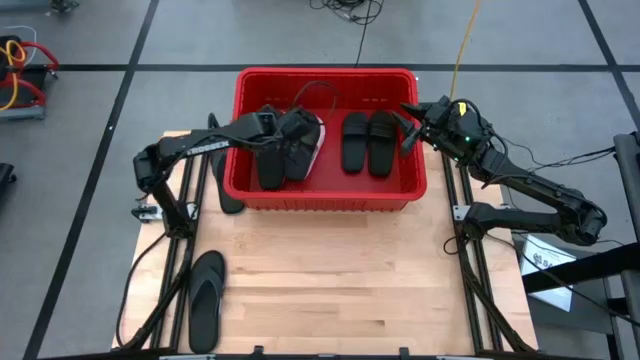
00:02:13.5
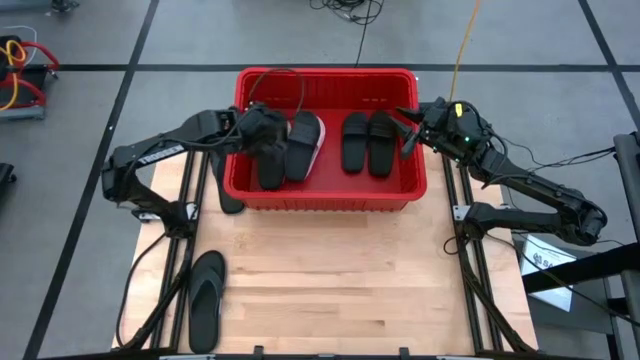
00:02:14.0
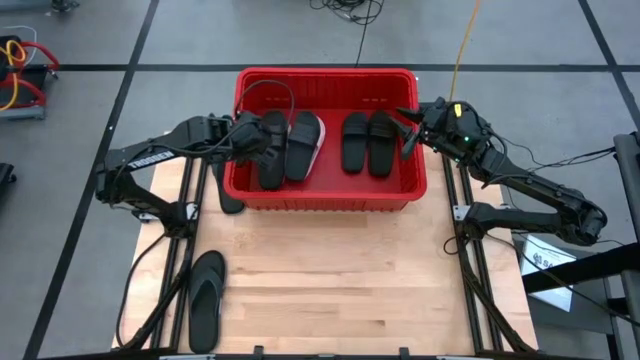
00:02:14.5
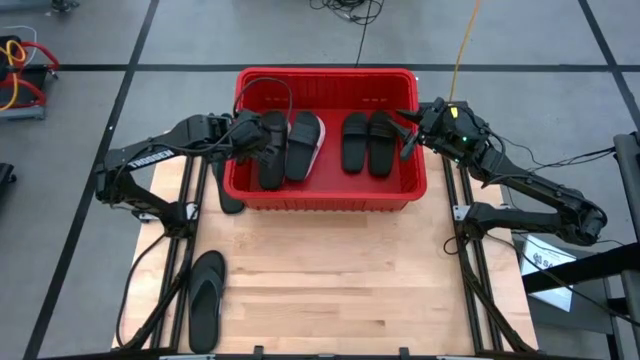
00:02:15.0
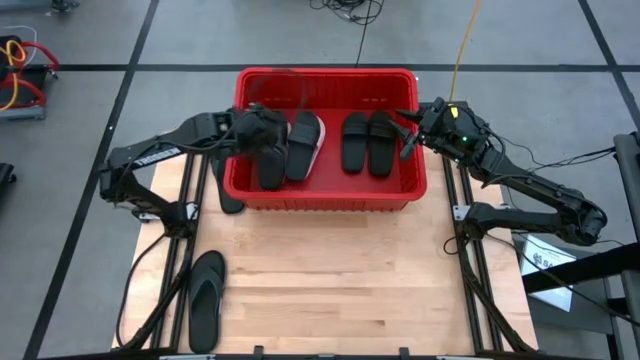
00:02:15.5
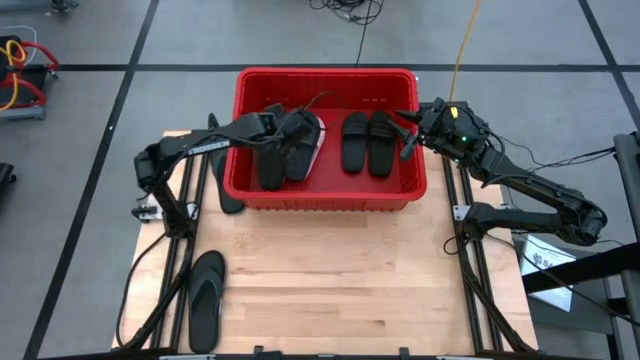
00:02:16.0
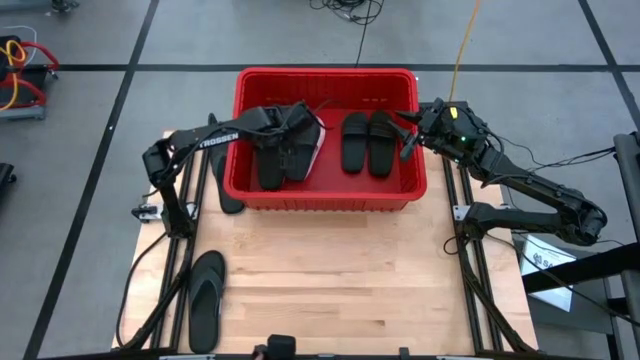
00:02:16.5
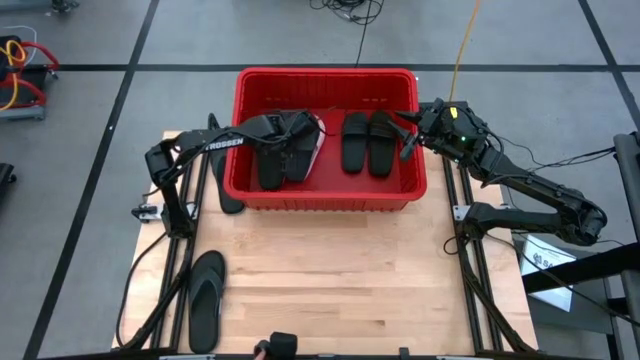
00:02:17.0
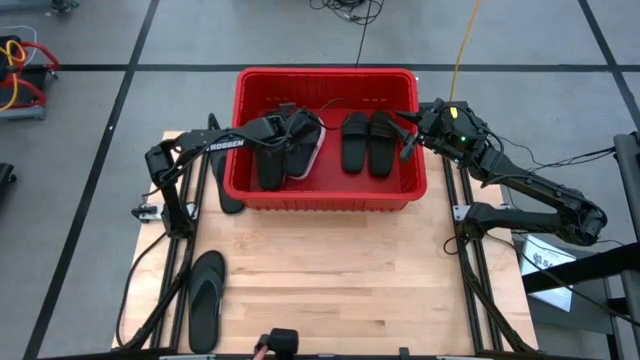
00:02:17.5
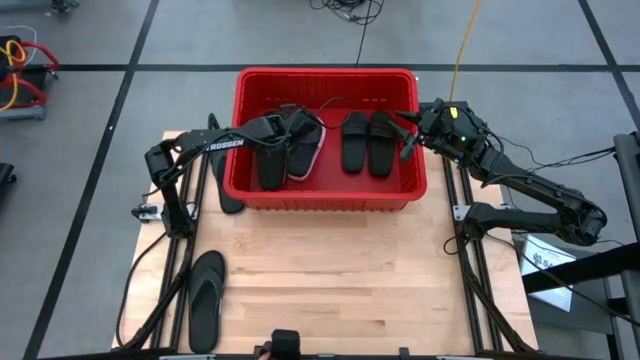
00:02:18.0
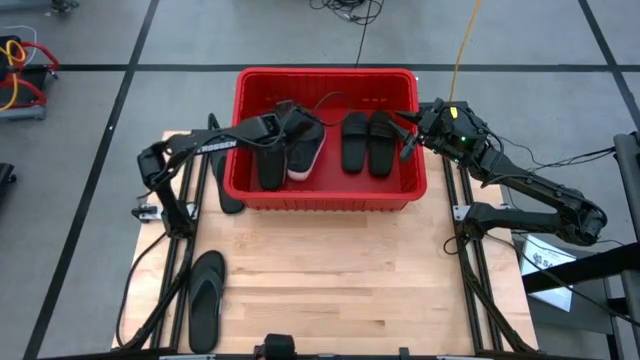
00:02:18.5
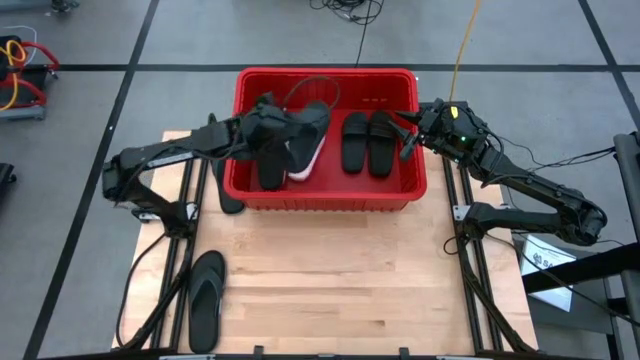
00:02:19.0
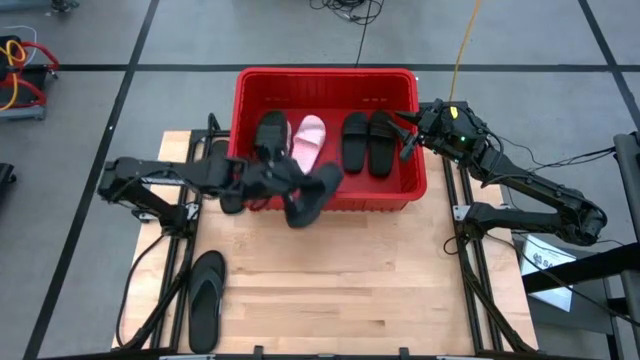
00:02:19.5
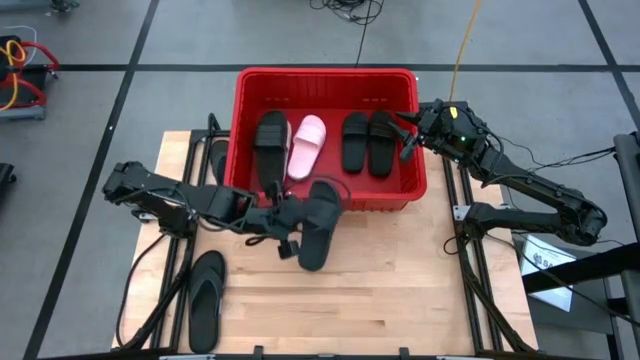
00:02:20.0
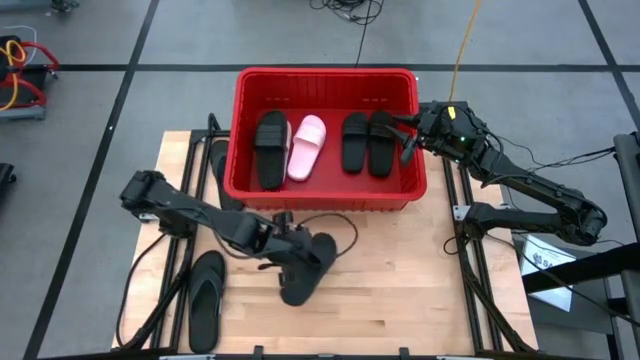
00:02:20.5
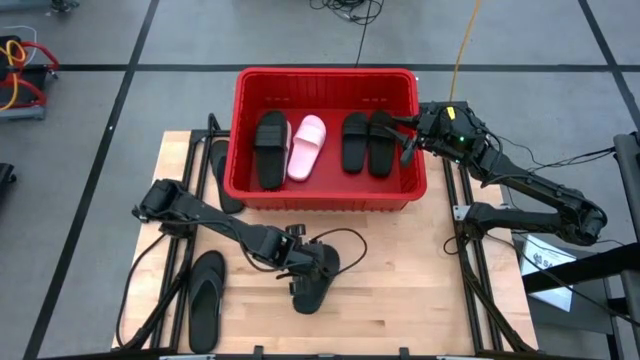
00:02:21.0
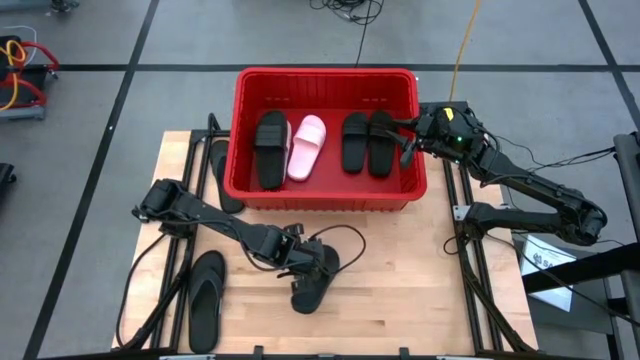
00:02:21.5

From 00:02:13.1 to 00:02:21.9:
Task: Pick and place slides into bin
Remove the black slide from the red bin

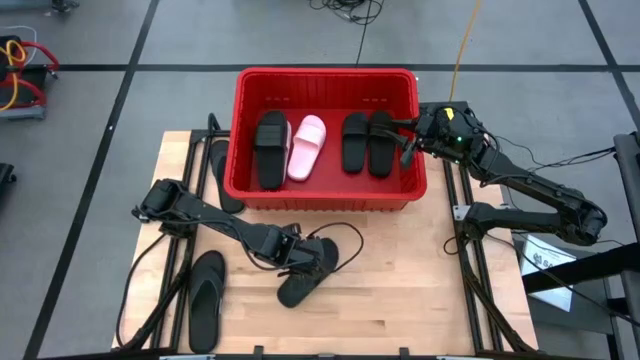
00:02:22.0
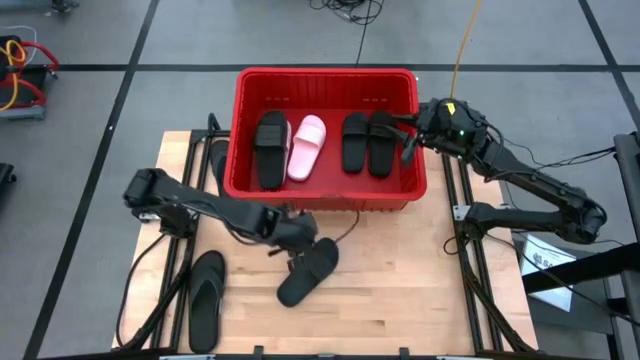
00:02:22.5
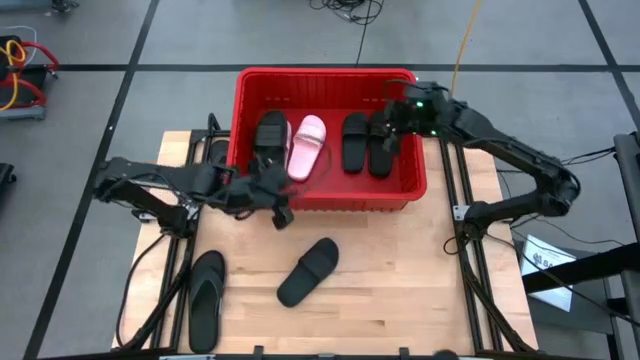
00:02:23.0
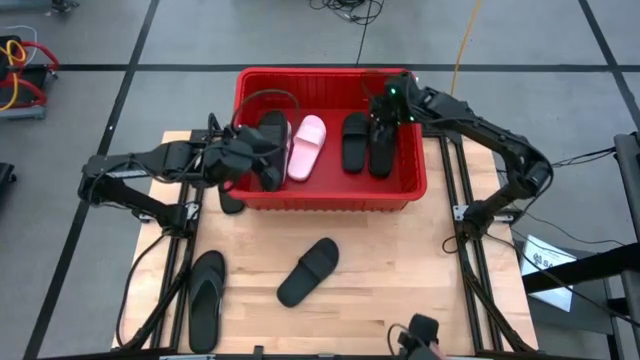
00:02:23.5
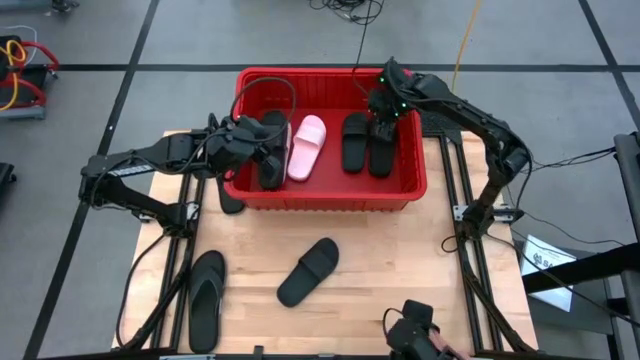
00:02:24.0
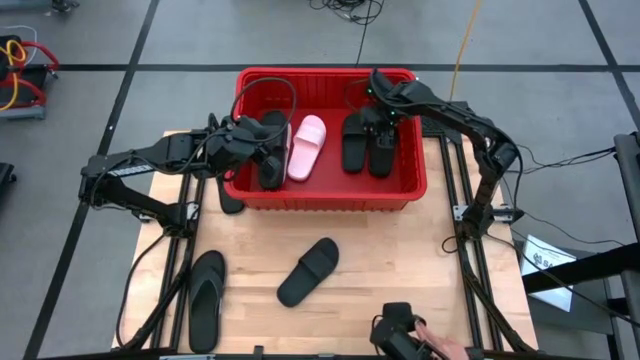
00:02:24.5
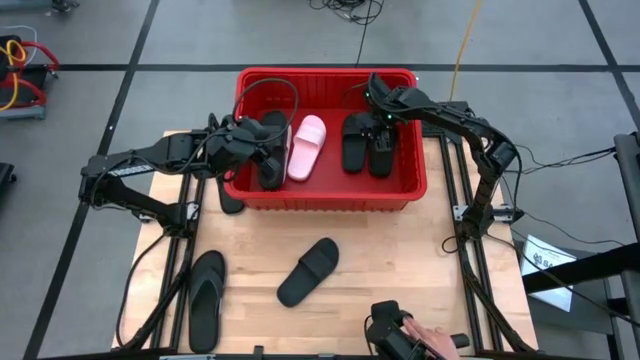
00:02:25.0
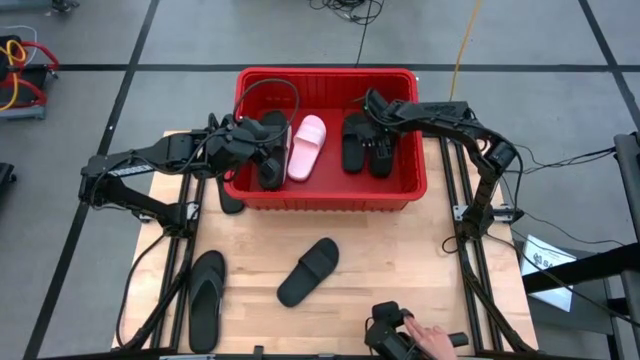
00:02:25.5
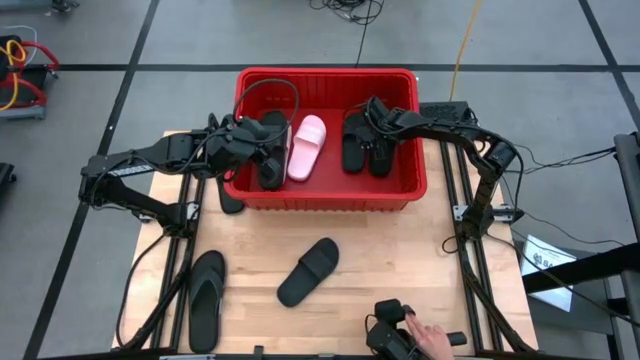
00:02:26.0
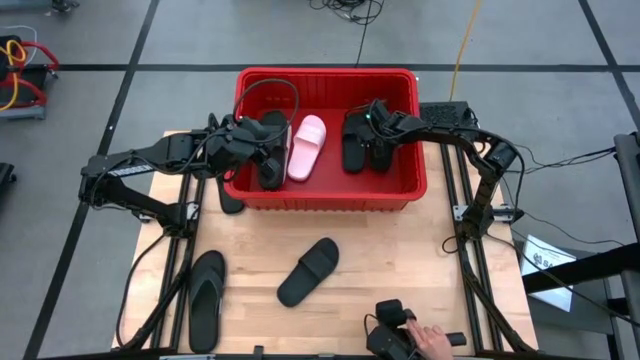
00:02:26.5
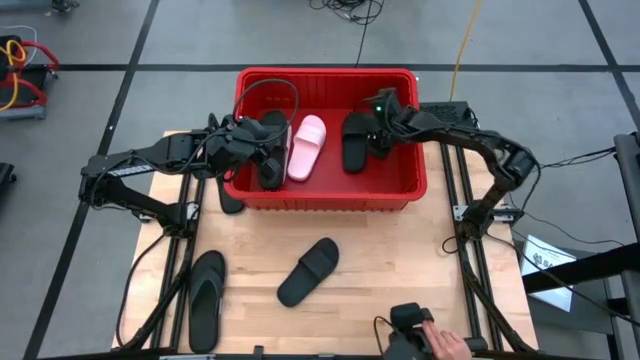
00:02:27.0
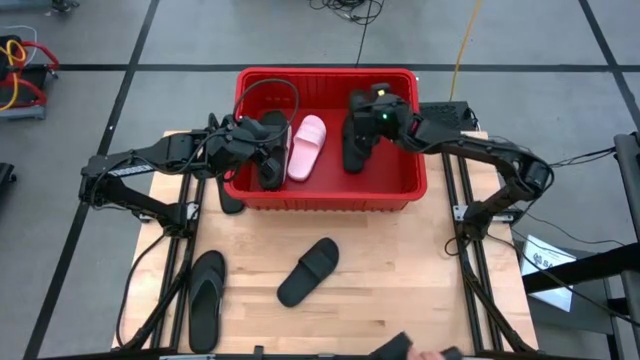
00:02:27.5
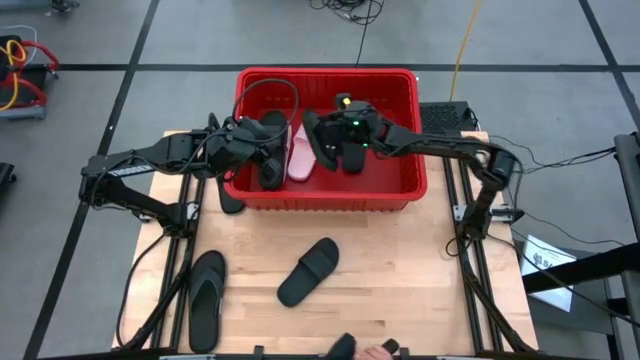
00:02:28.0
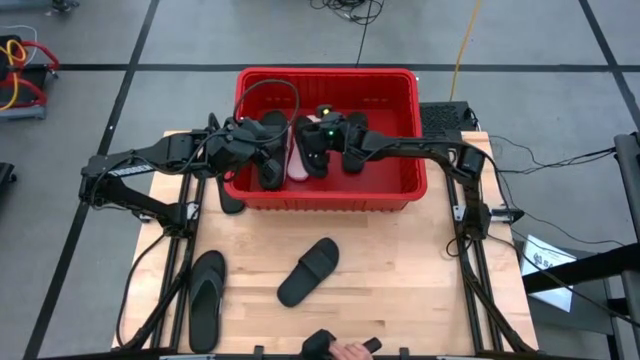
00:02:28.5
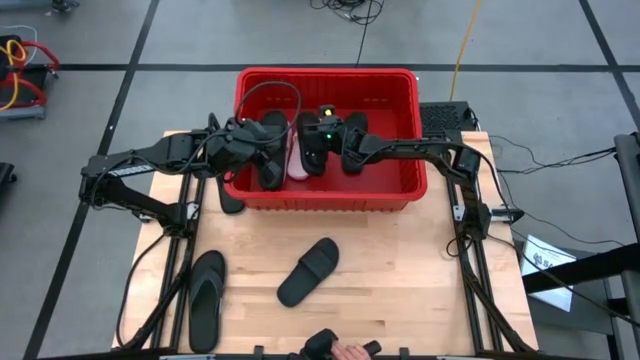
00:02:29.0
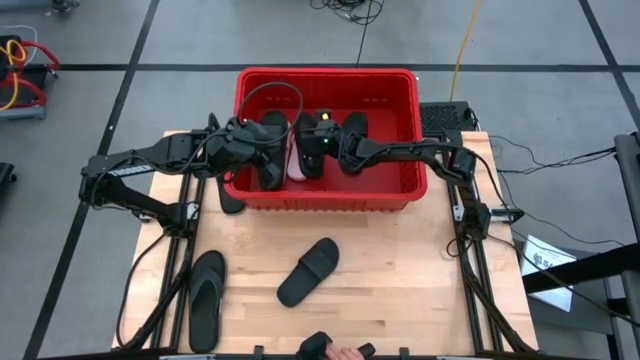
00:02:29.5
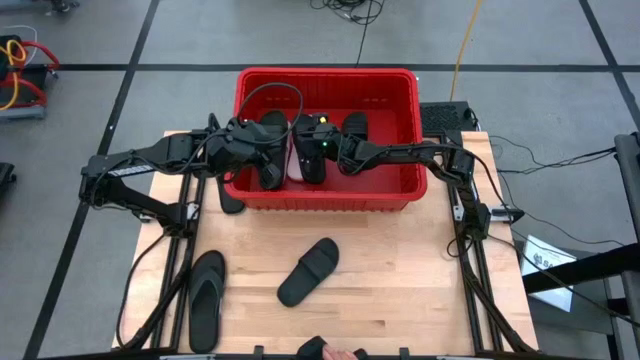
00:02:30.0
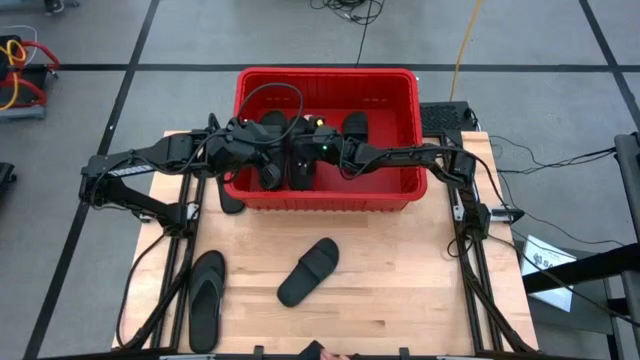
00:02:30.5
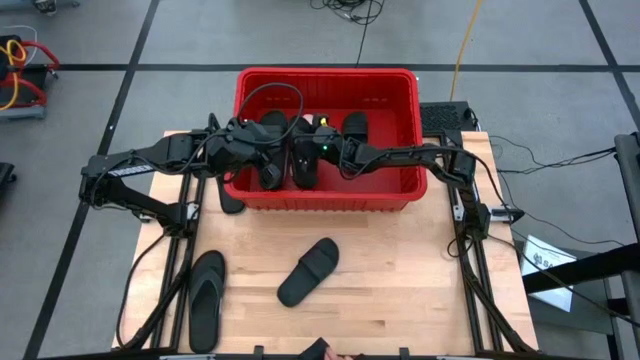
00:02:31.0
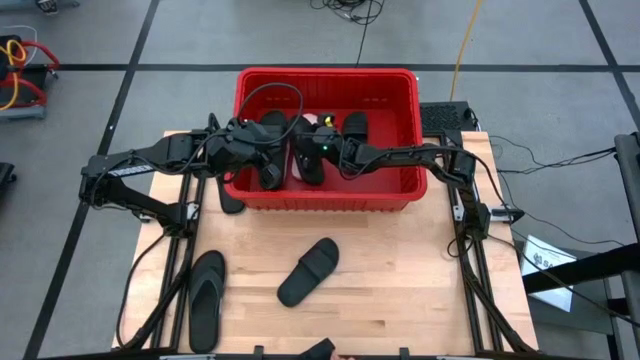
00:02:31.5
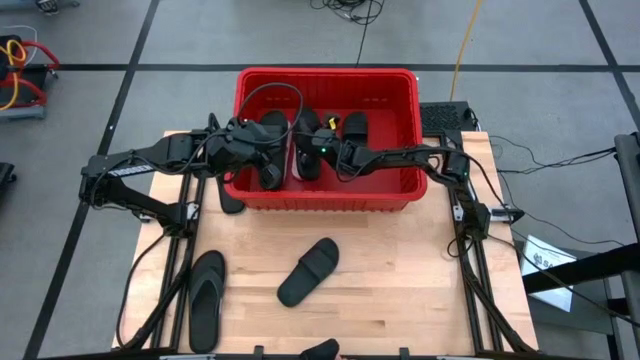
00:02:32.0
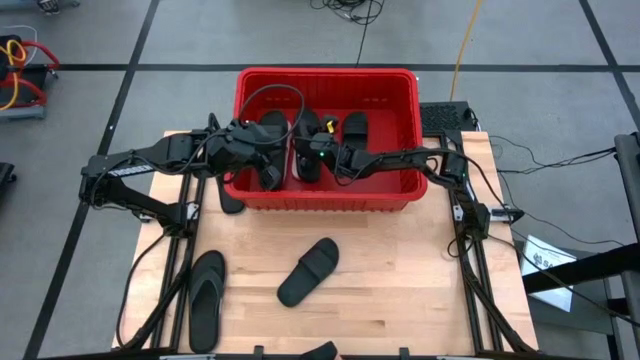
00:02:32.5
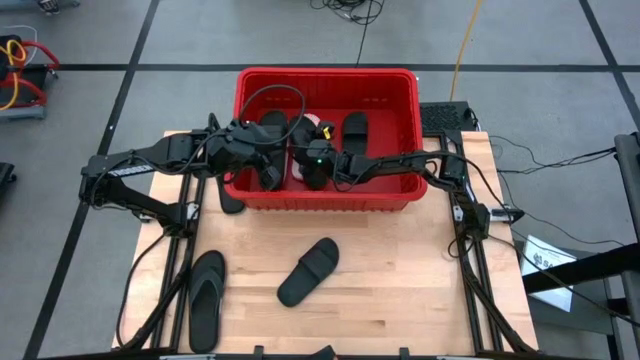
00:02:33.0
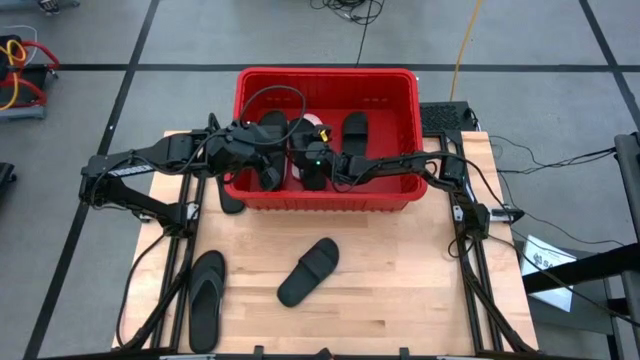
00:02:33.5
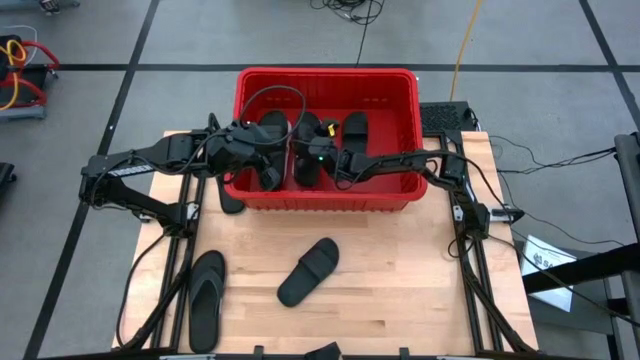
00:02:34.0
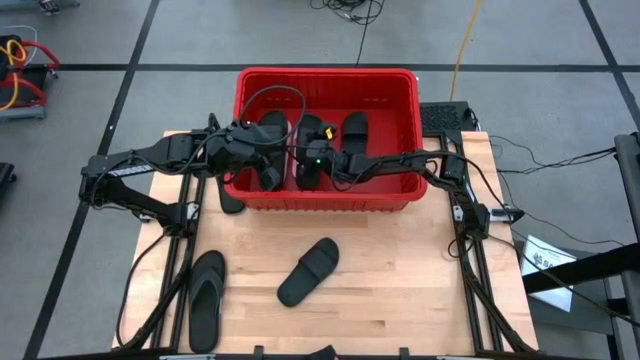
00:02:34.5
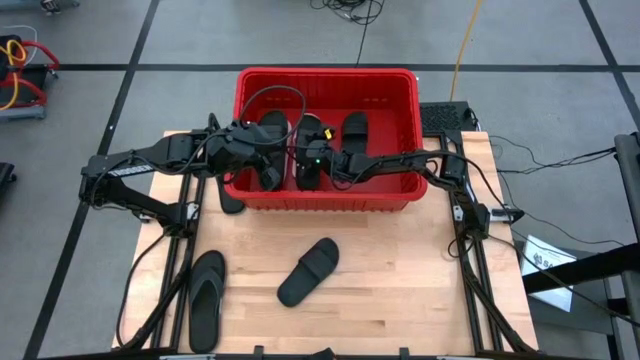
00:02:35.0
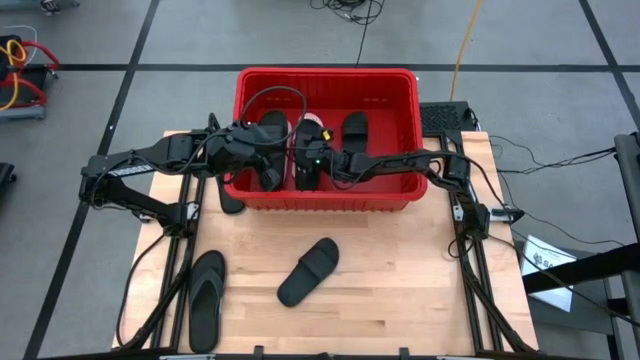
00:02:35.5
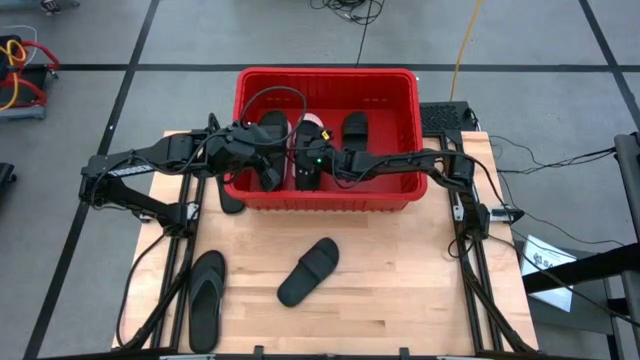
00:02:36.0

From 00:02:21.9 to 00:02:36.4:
Move the black slide to the top of the pink slide in the red bin
